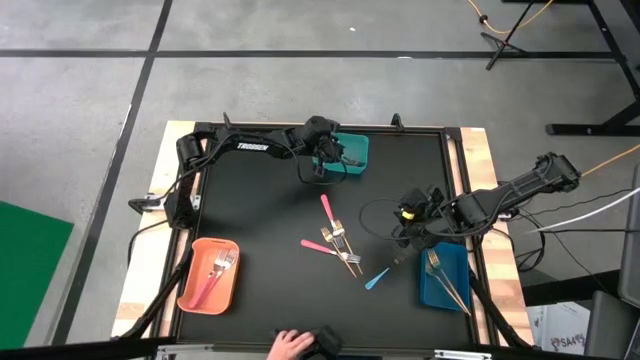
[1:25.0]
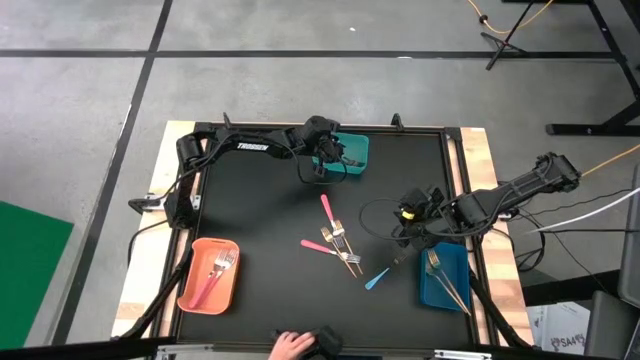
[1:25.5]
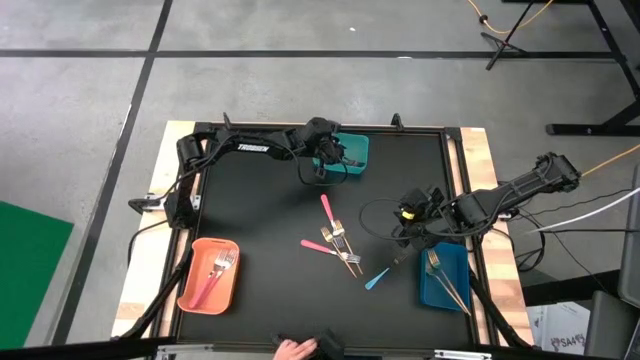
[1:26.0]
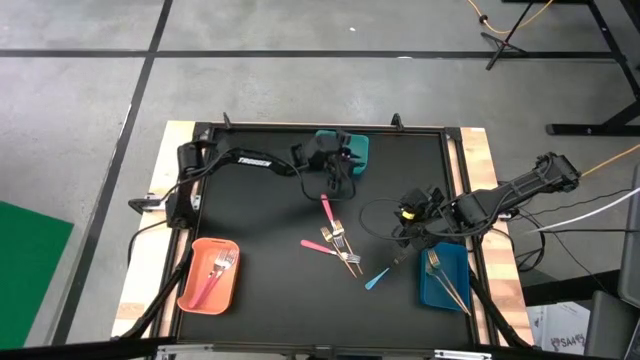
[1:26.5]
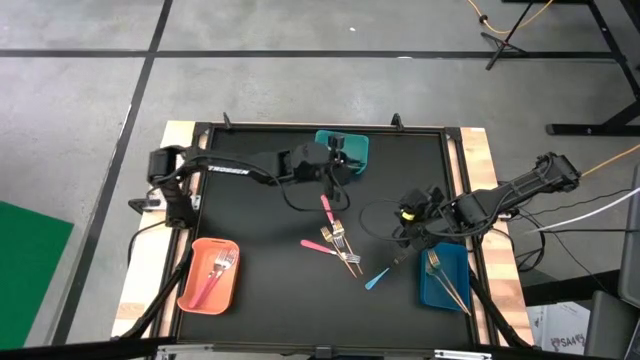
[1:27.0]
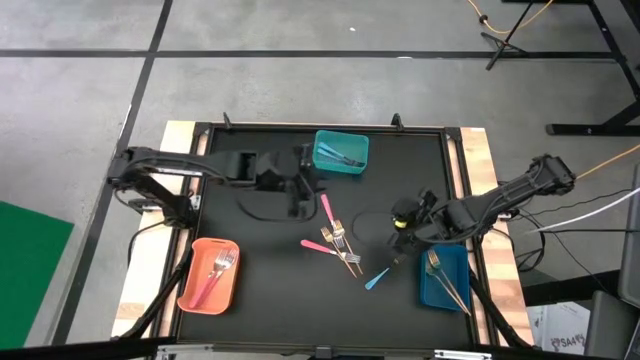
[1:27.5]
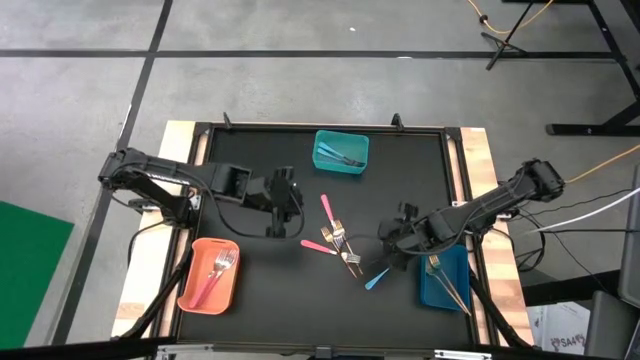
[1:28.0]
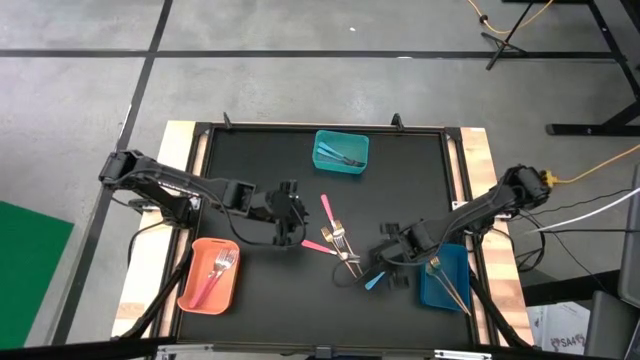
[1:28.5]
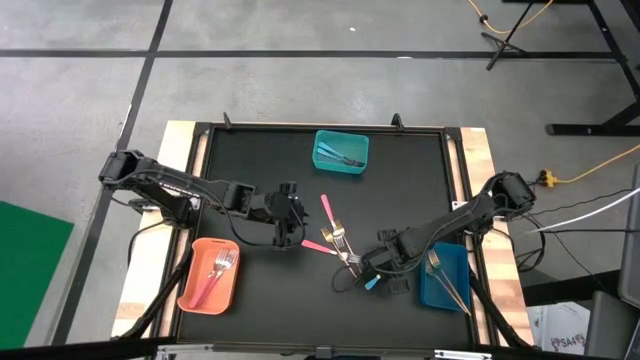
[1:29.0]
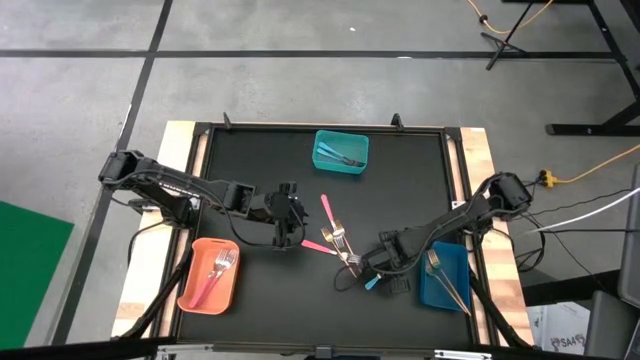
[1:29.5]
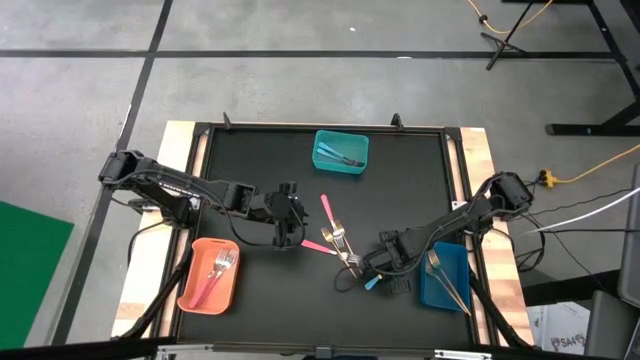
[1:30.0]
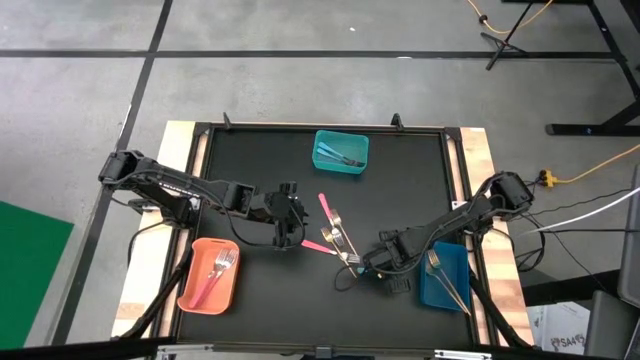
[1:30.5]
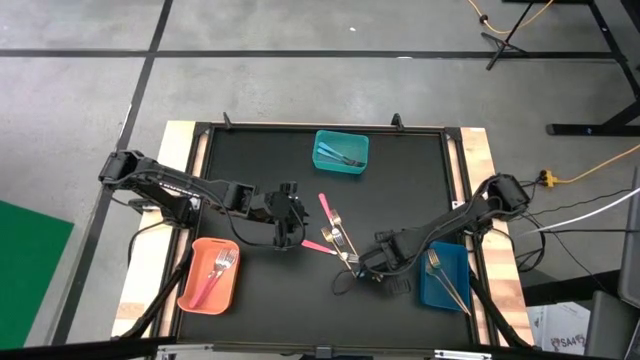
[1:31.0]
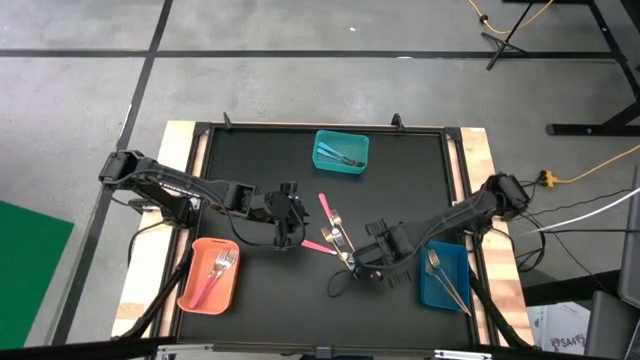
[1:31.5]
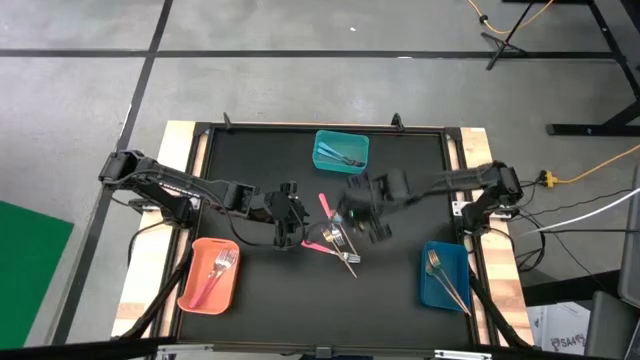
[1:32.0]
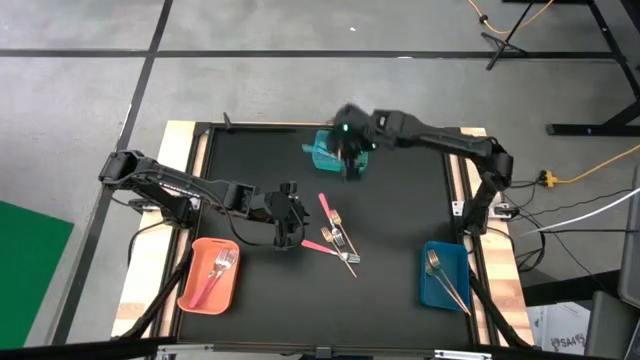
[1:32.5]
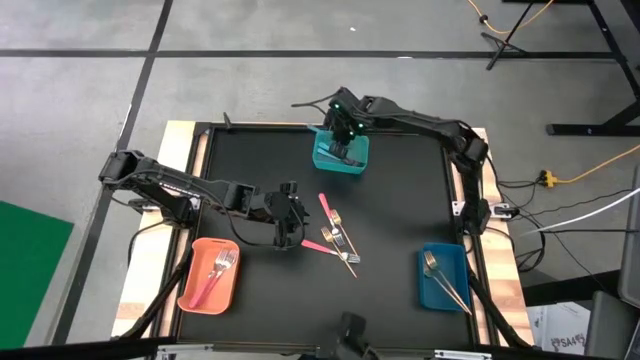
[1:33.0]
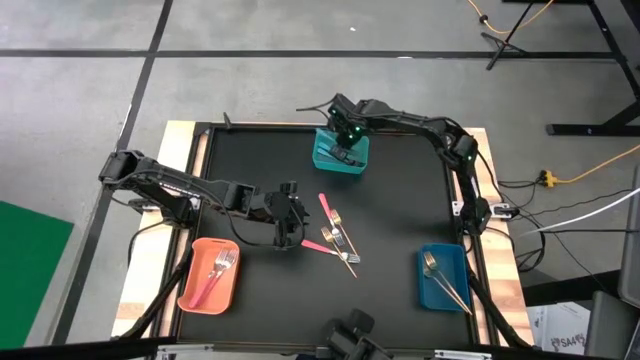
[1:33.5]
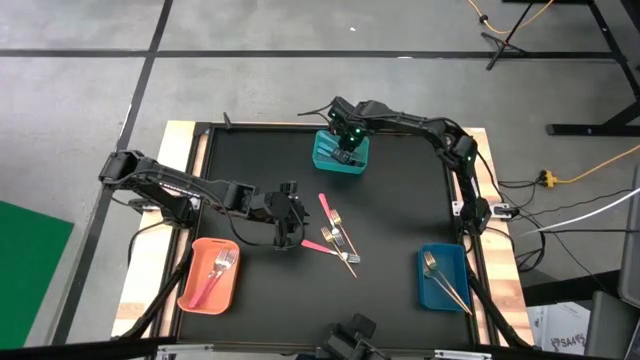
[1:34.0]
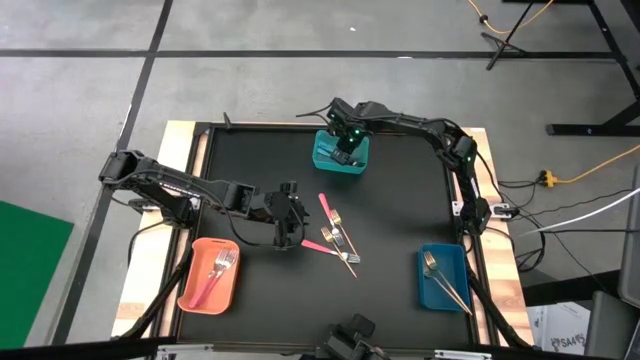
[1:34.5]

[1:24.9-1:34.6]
Task: Sort silverware by color (type)
Put the blue fork into the green bin

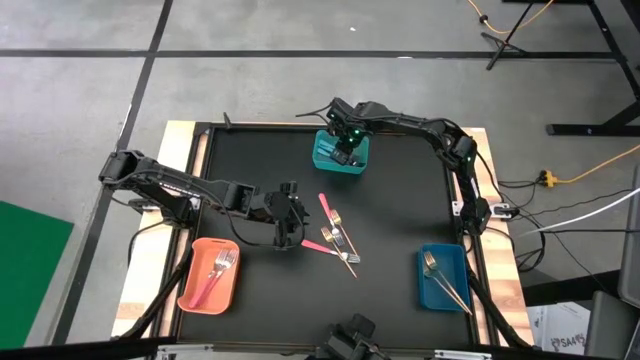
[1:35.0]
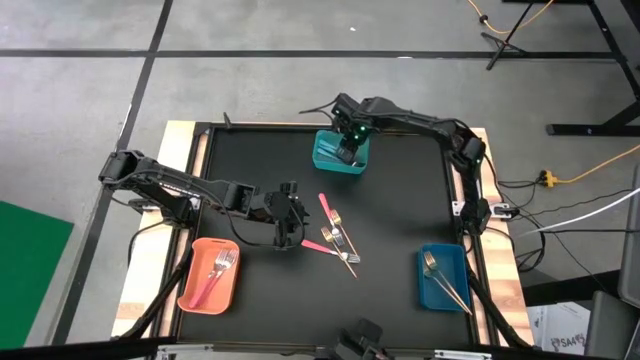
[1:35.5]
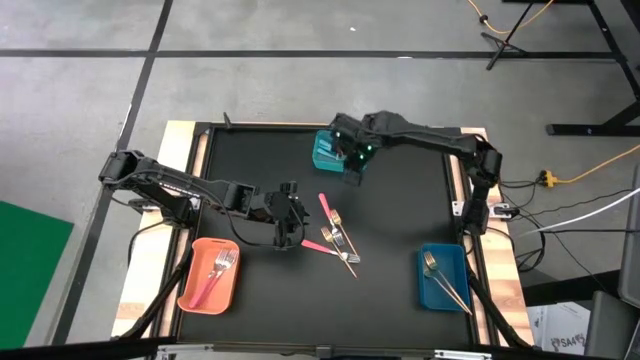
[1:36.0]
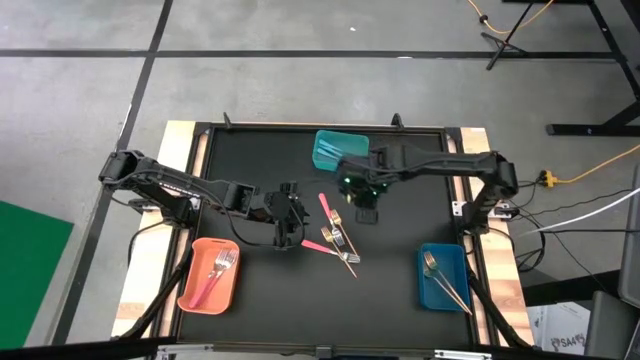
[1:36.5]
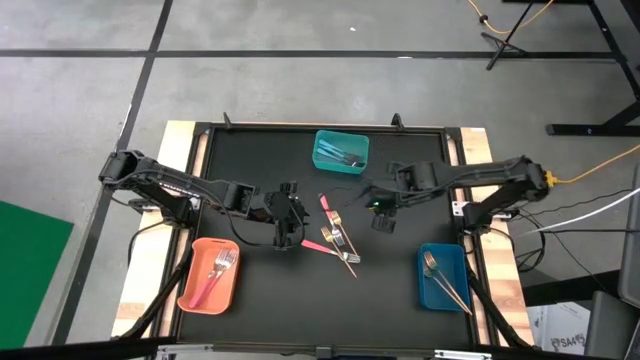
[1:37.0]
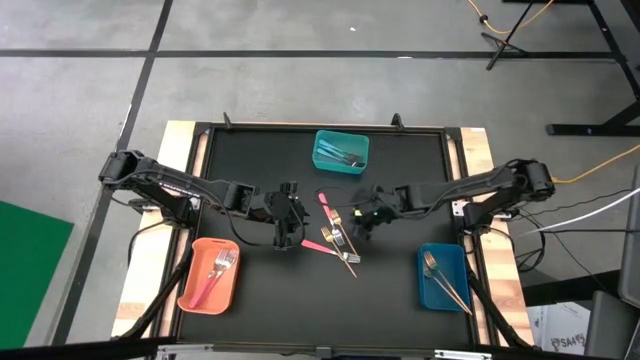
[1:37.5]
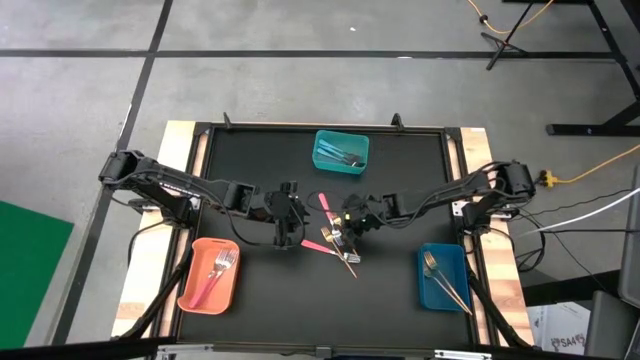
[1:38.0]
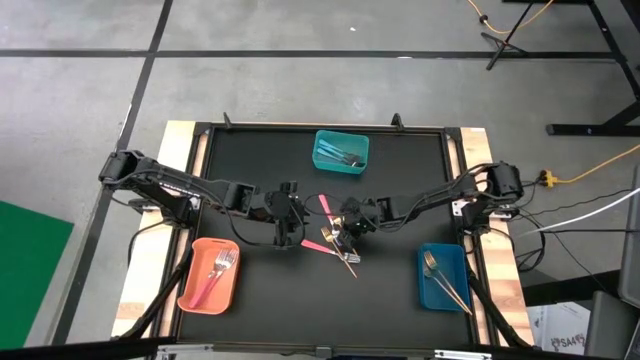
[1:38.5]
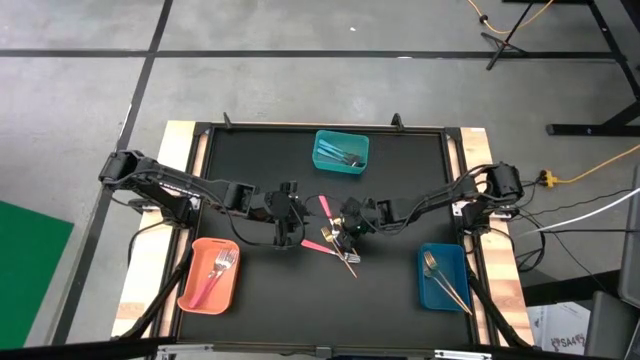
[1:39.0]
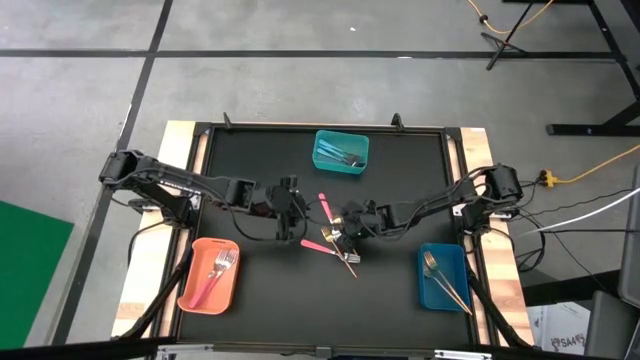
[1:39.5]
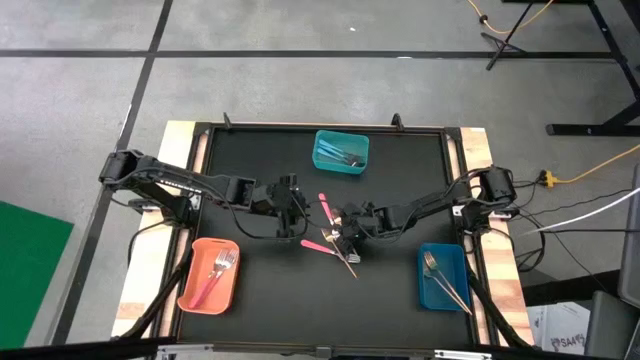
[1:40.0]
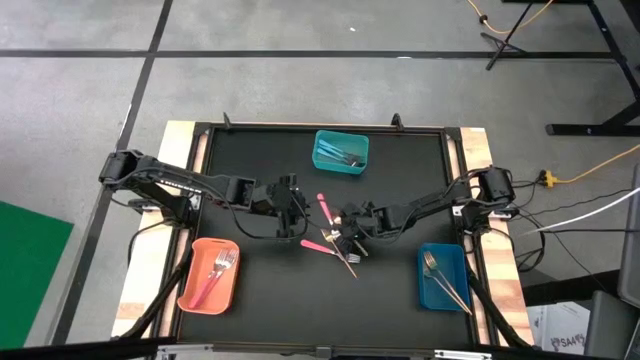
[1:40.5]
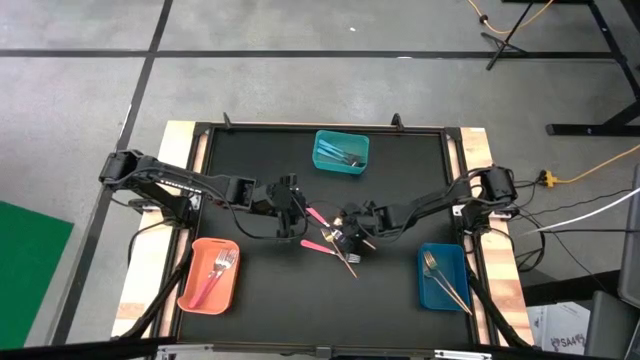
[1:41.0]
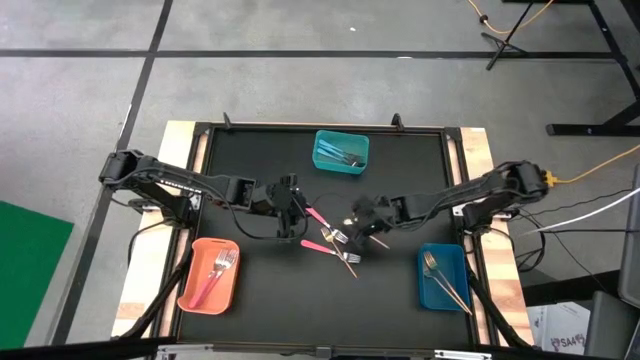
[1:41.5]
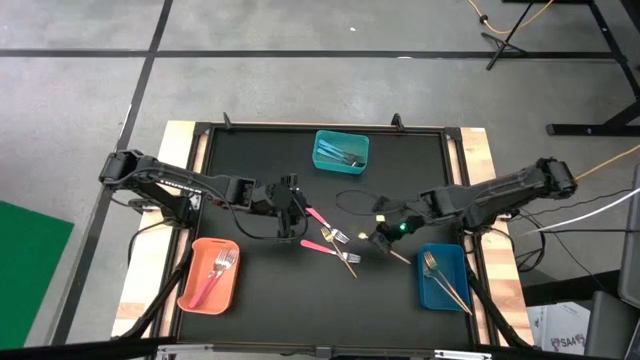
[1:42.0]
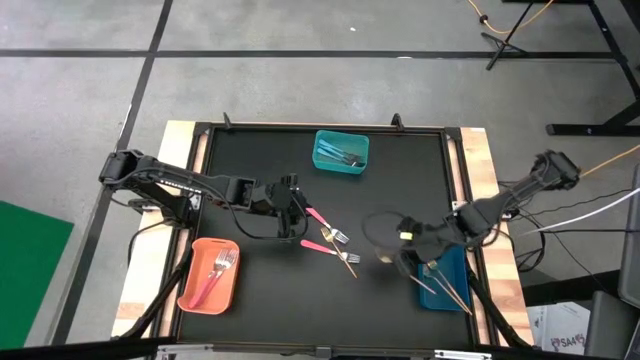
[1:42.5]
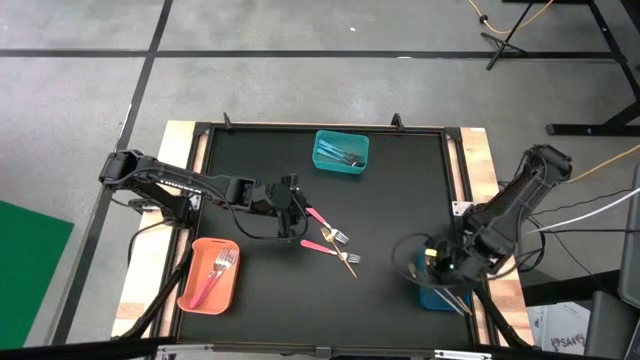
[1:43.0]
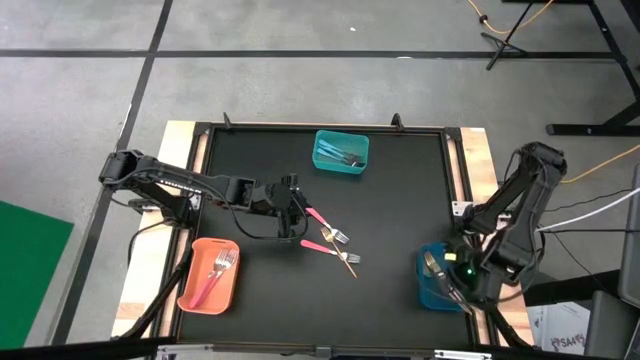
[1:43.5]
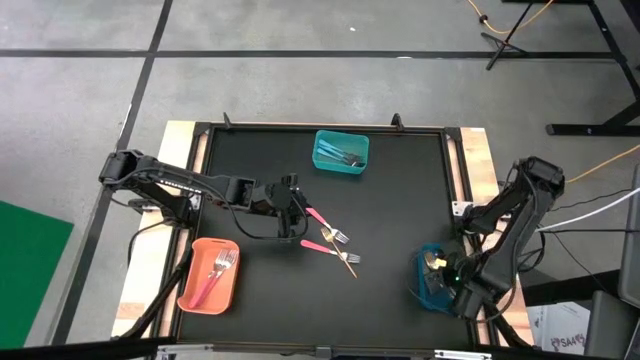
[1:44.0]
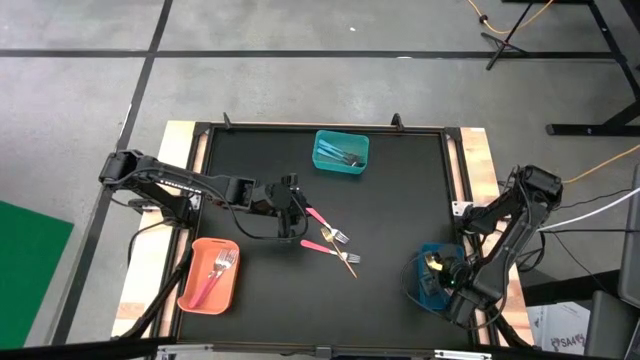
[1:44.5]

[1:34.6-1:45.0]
Put the gold fork into the blue bin

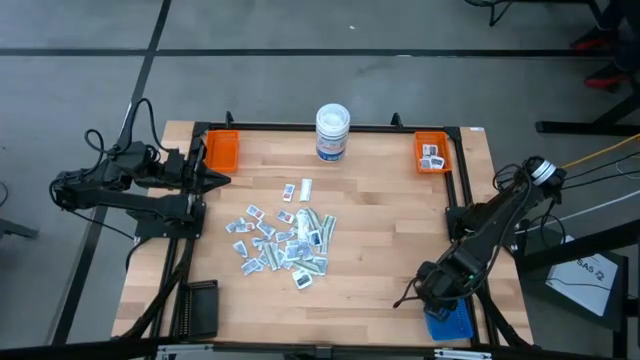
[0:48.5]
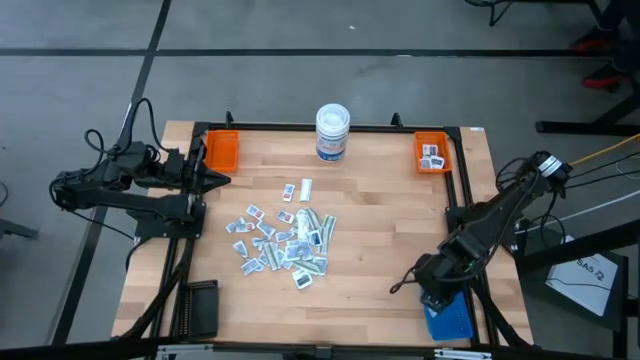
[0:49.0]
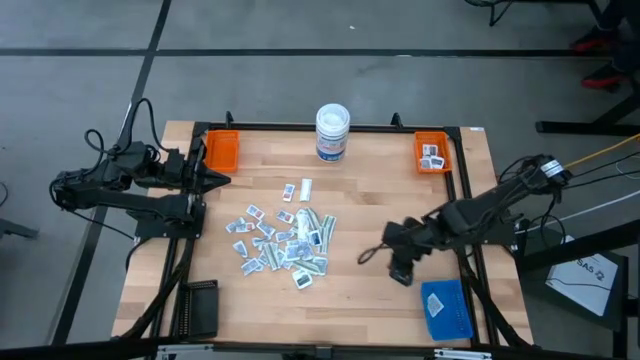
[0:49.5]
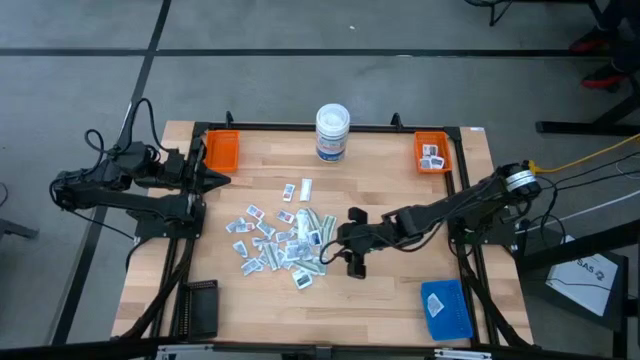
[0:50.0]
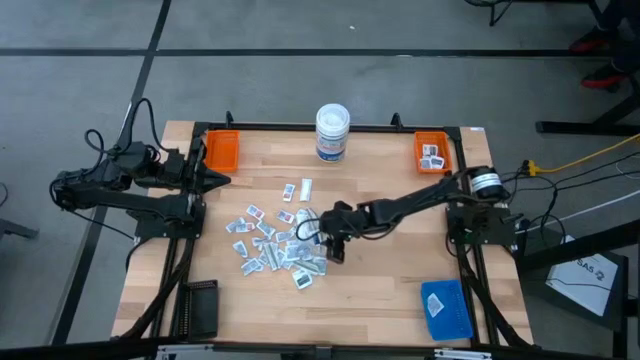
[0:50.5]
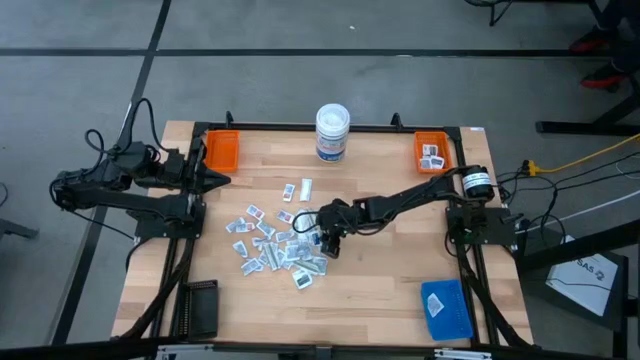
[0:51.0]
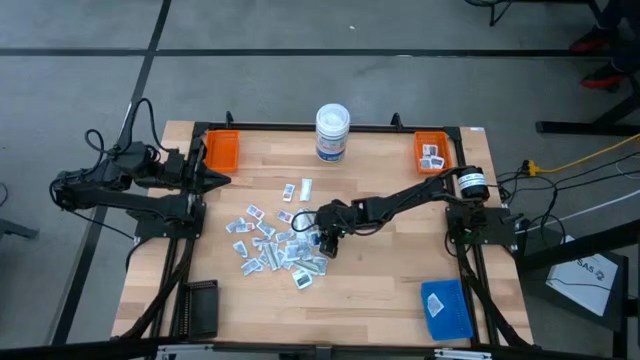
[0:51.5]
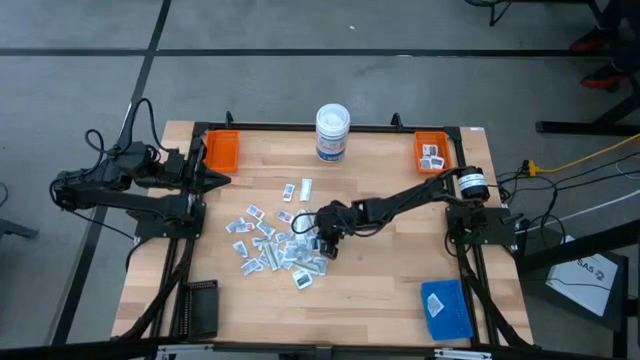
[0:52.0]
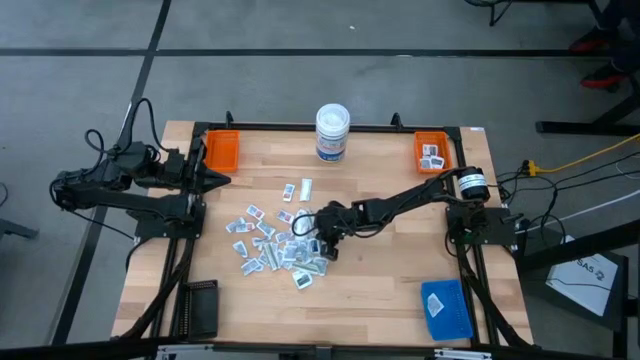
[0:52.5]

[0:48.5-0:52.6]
Task: Pick & Place First Aid Supplies
Put the blue alcohol pad into the blue bin
